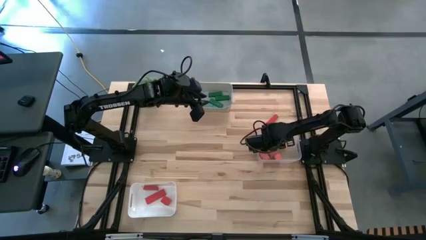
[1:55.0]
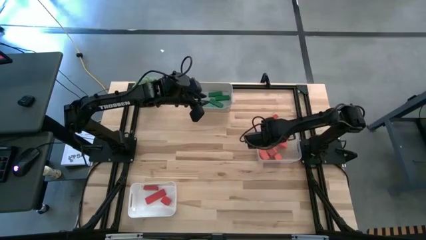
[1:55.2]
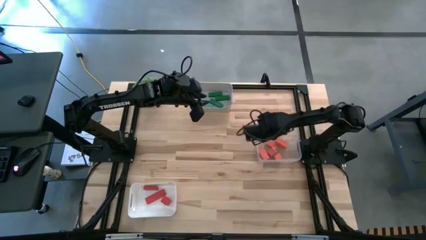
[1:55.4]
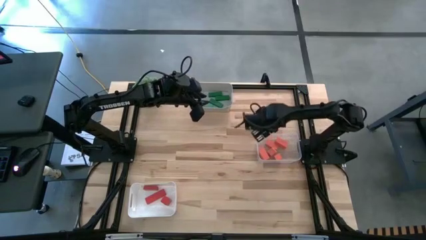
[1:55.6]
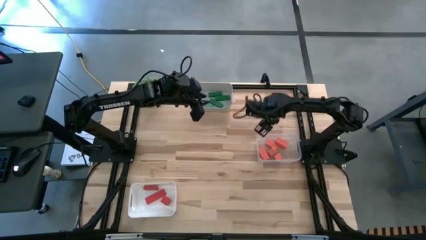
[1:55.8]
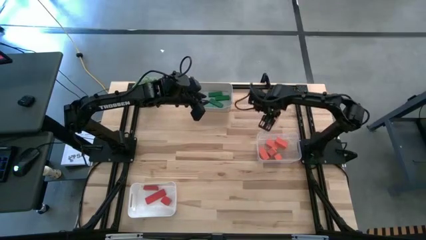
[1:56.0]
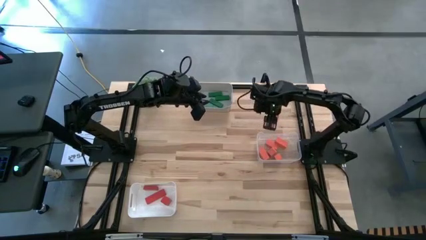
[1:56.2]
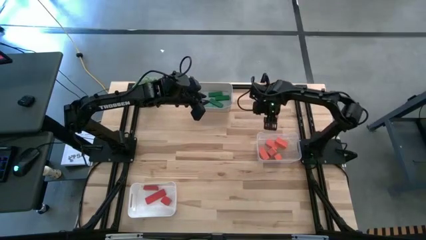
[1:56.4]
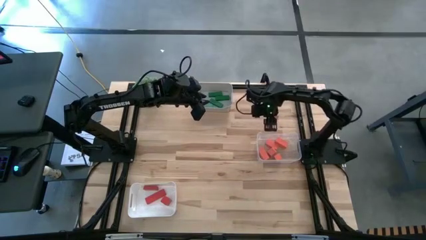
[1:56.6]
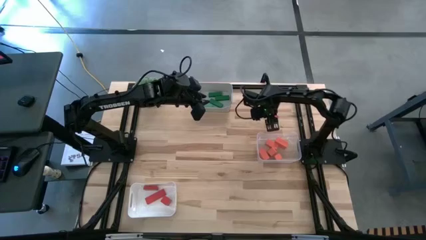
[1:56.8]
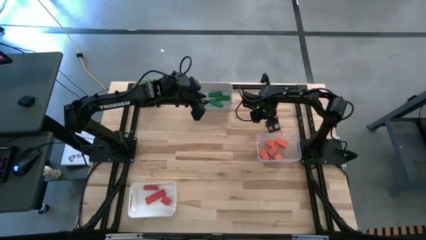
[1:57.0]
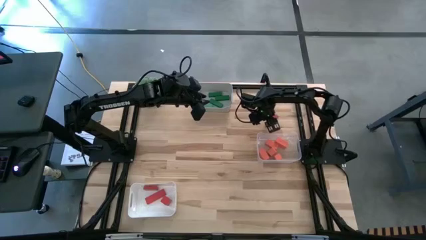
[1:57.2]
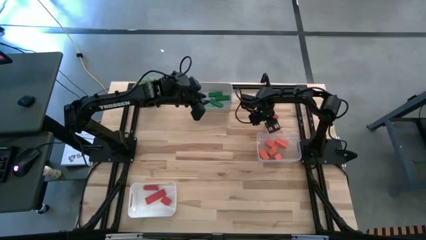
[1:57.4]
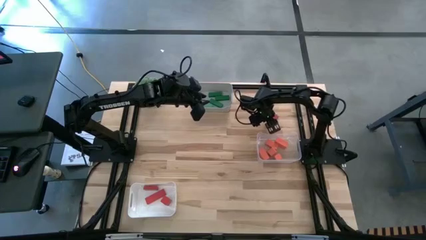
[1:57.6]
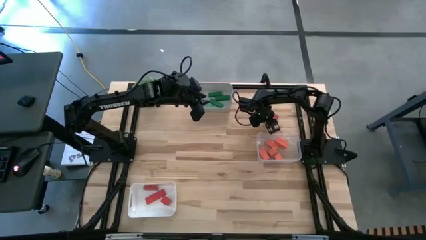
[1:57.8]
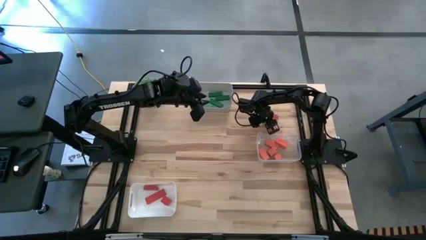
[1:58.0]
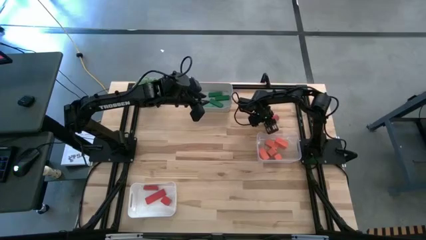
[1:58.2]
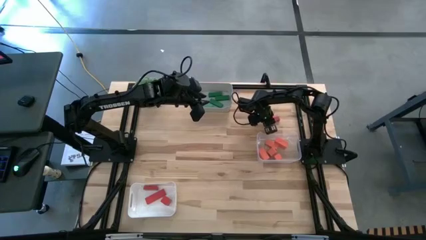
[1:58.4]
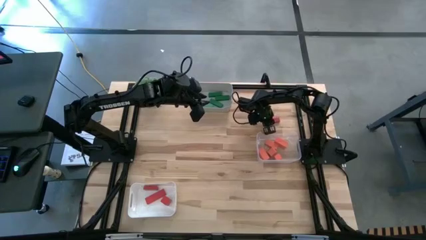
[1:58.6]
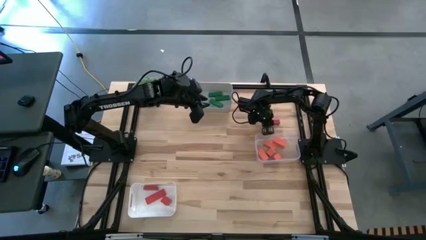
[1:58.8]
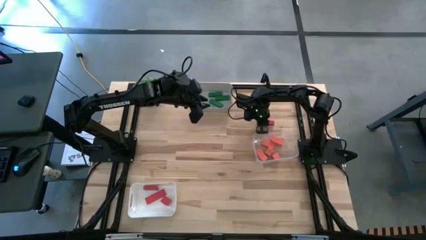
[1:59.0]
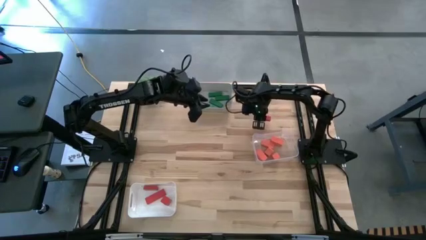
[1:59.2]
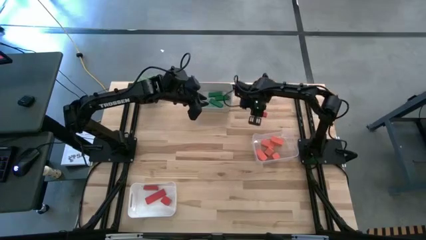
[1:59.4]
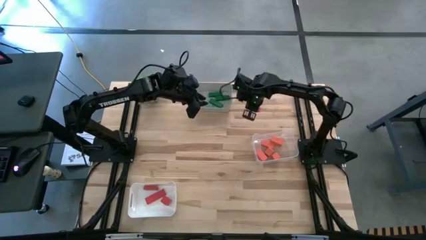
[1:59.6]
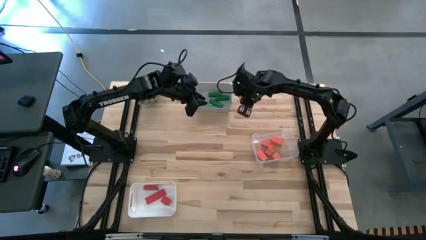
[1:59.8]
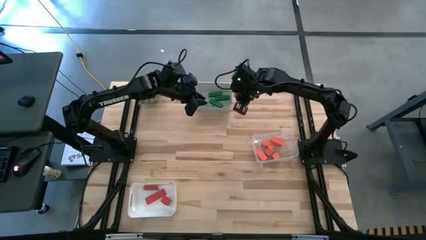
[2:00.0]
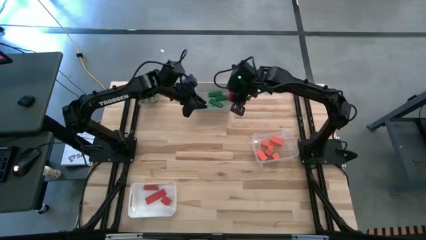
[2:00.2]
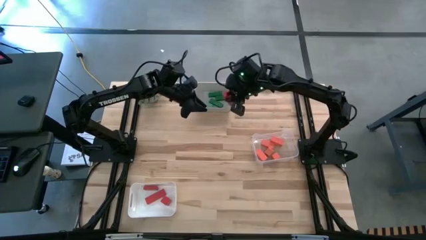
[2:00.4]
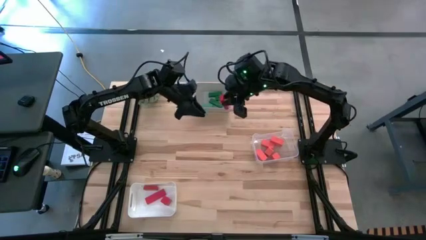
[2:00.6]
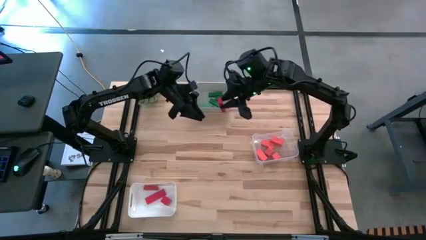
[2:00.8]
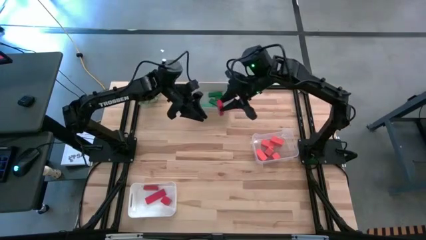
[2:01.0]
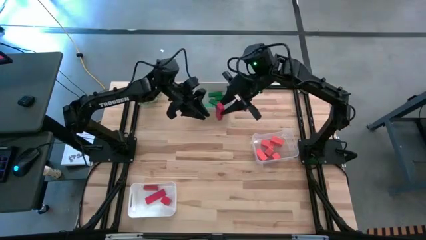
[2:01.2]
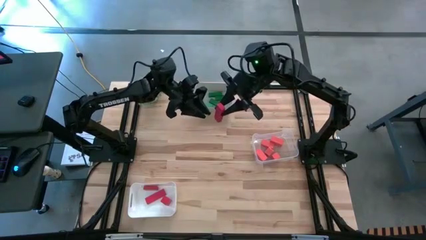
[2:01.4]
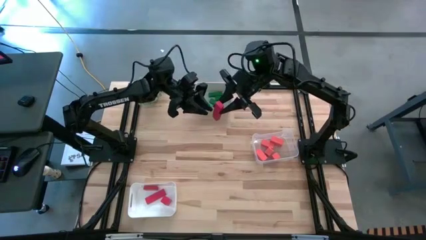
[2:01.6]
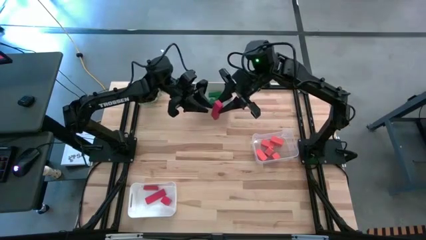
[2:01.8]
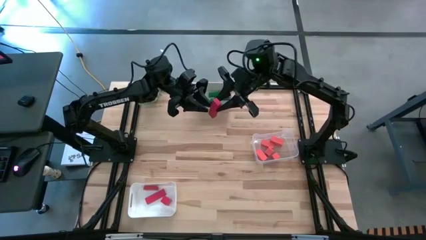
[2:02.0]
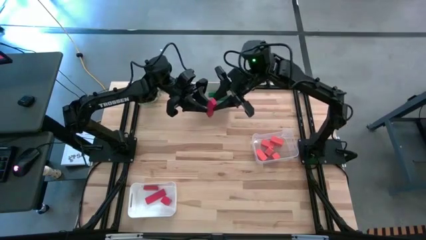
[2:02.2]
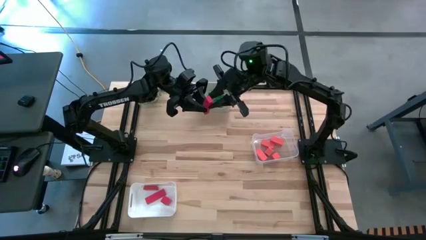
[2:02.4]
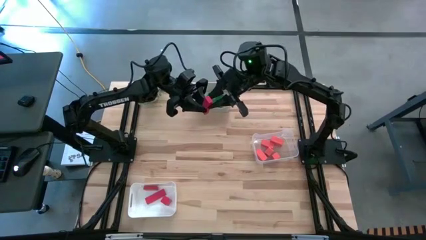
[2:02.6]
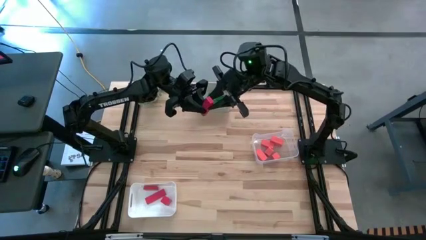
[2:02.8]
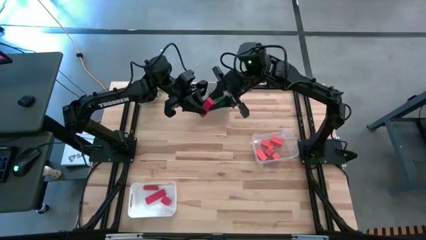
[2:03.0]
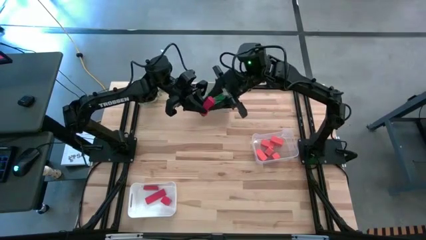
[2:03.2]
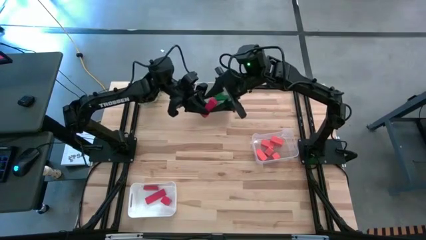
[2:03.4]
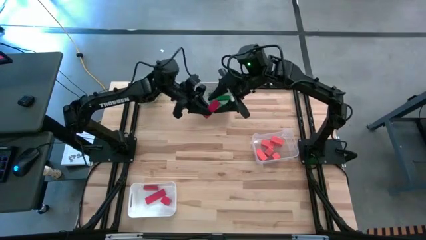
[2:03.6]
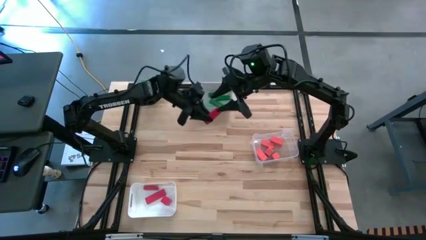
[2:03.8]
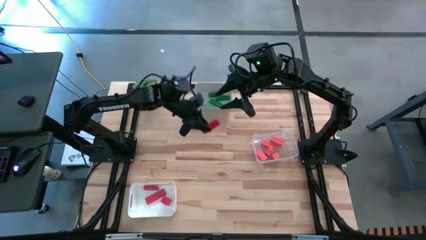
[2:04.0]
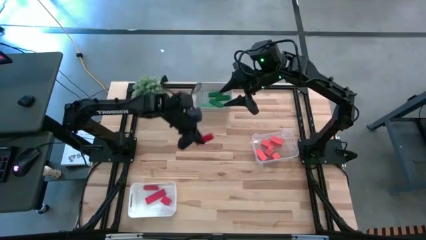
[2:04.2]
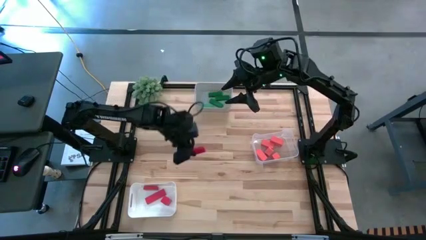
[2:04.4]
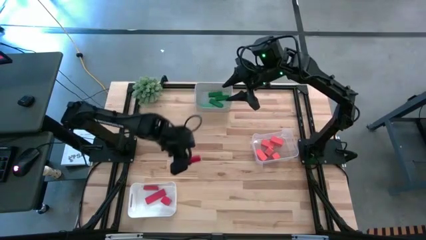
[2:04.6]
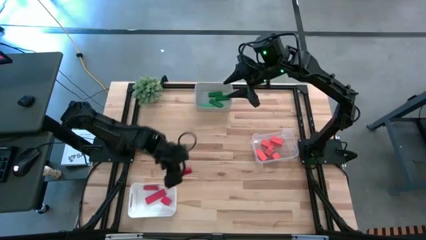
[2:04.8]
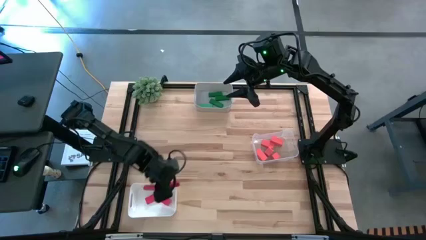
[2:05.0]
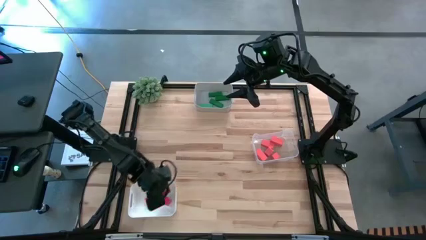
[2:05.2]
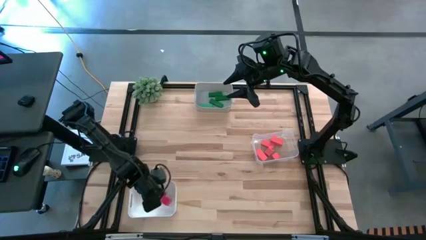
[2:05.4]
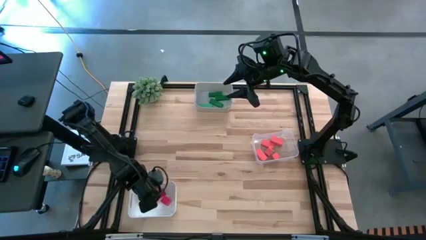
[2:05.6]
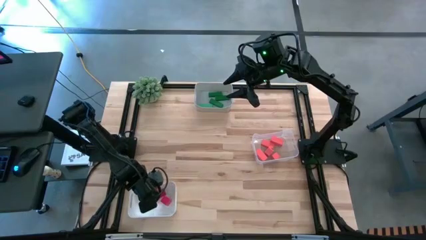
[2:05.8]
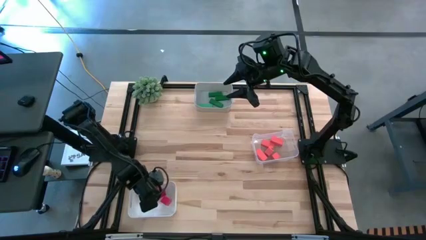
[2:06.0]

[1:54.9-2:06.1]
Task: Sort & place blocks by color
Put the red block into the white bin

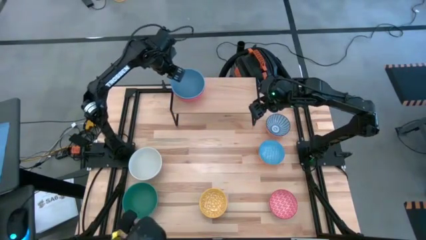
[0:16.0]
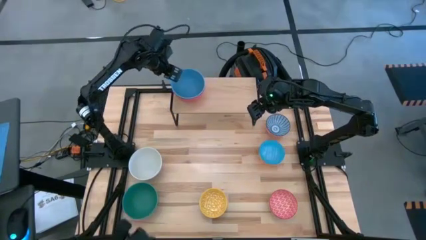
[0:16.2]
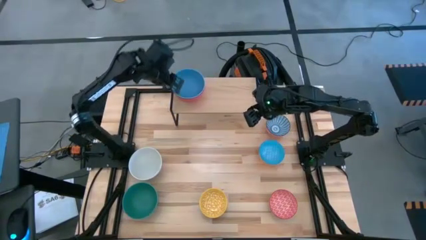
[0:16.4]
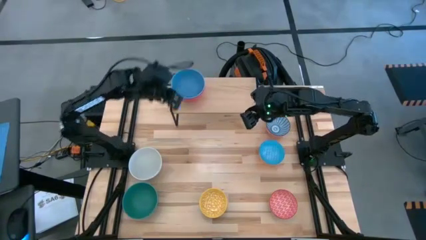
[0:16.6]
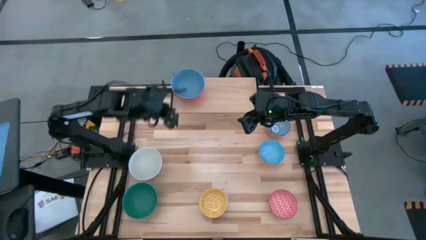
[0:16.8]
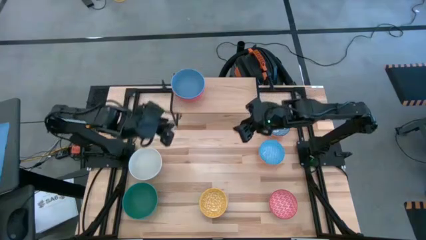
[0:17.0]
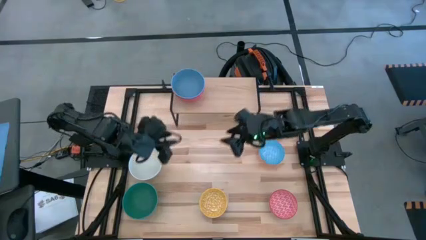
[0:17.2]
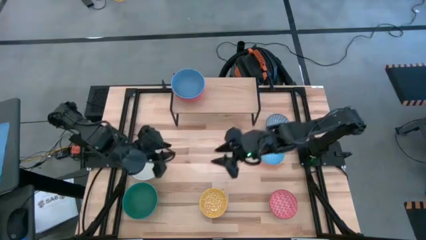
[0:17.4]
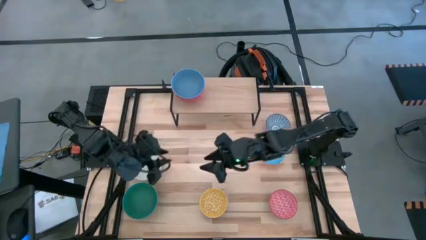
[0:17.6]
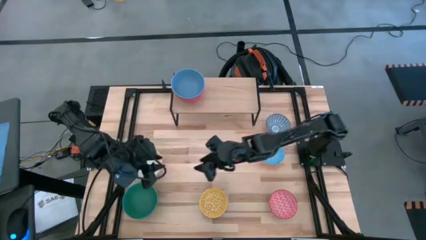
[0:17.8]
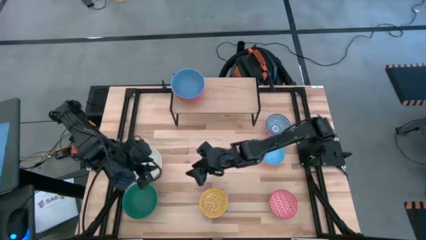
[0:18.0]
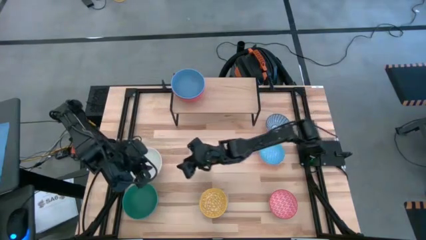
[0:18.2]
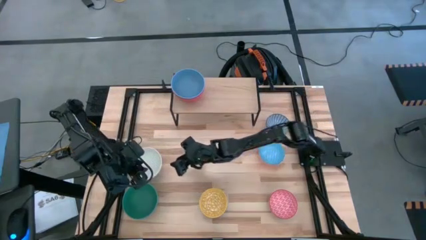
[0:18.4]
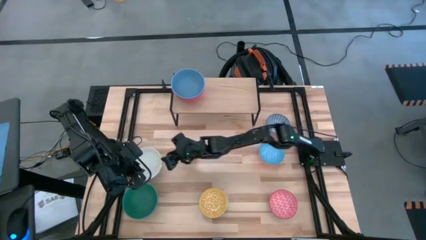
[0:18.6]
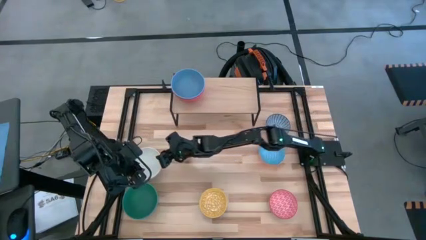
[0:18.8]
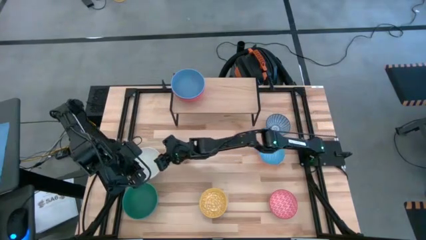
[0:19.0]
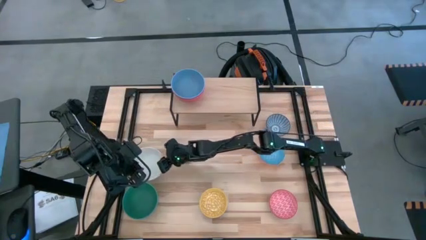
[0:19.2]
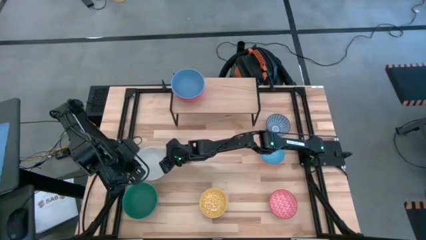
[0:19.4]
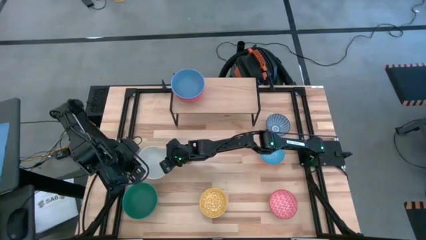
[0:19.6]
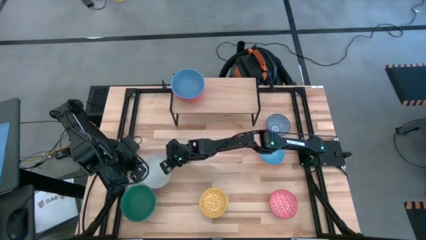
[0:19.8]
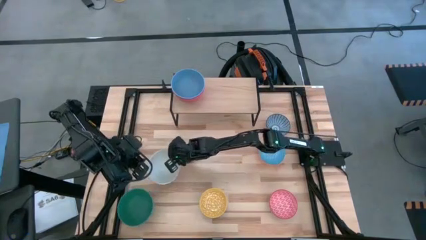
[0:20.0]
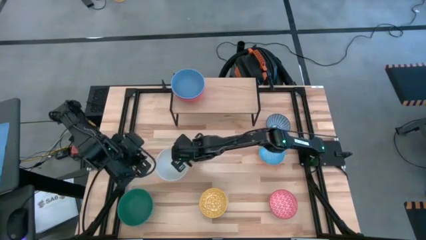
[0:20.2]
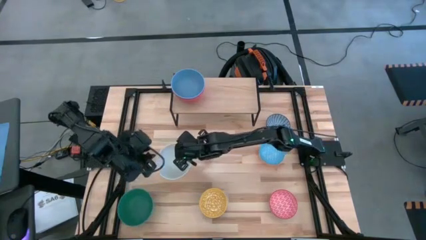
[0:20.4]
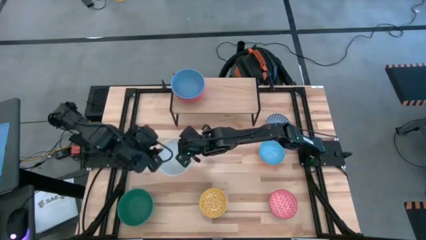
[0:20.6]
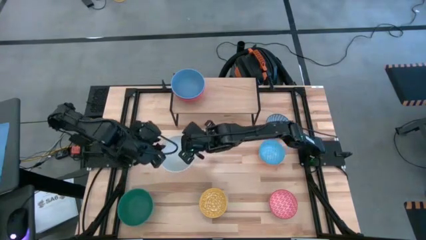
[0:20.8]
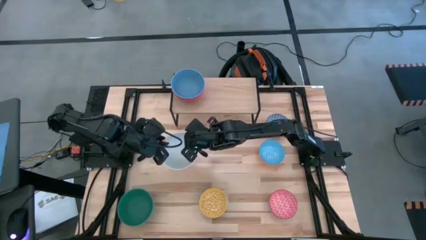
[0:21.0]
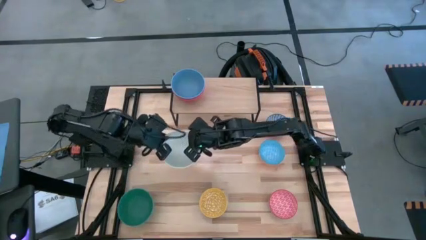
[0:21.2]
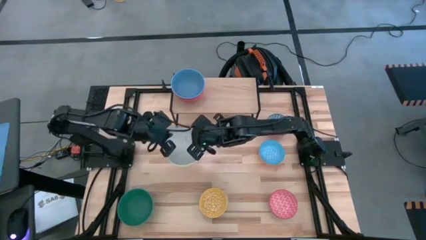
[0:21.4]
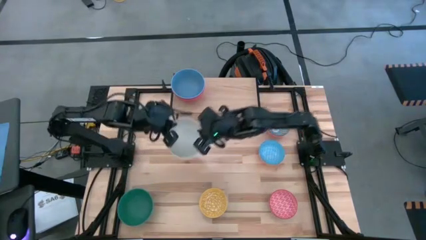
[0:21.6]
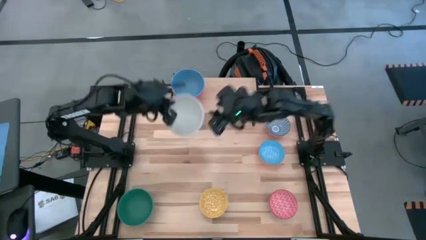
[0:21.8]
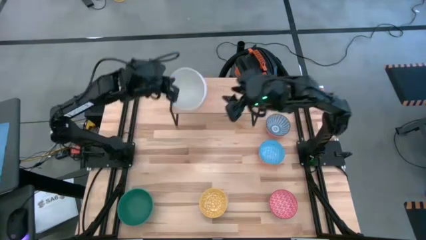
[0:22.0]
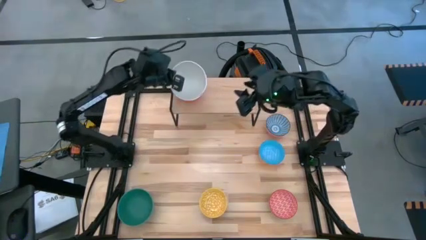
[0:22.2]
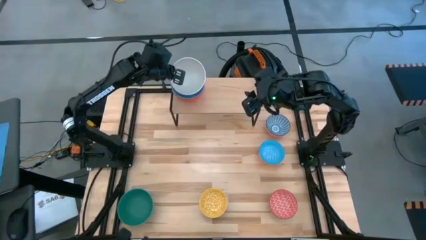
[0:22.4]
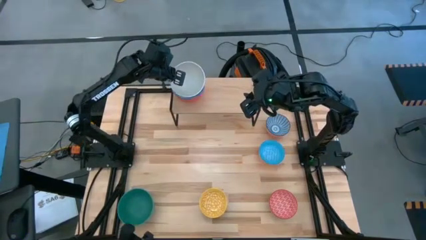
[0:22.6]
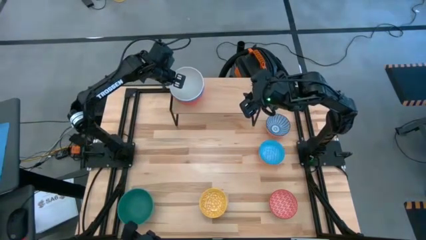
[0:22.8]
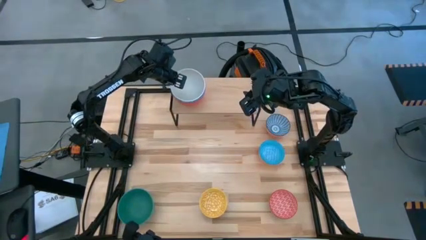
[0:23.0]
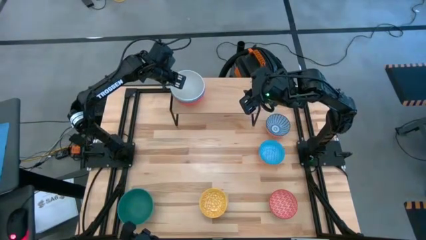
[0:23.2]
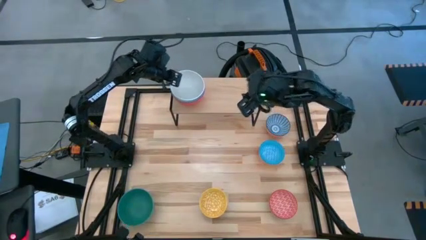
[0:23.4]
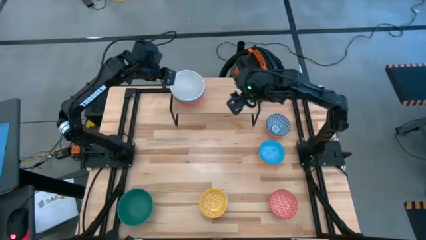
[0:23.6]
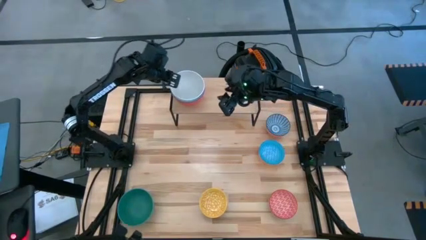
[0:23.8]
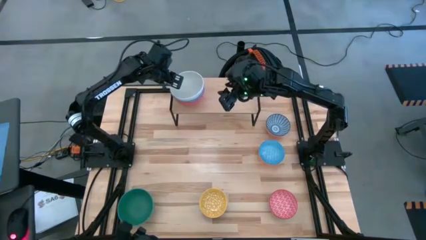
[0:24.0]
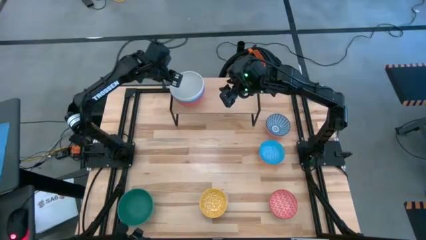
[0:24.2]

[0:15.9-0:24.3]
Task: Place and stack bowls onto a shelf
Stack the white bowl on top of the blue bowl on the shelf
